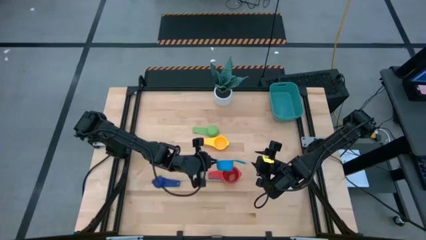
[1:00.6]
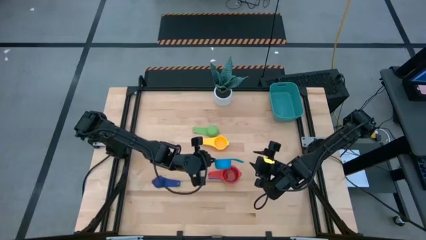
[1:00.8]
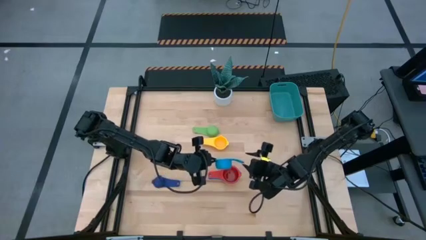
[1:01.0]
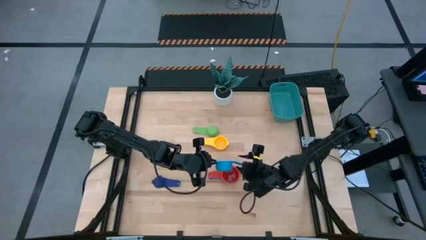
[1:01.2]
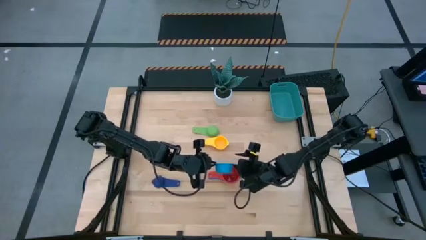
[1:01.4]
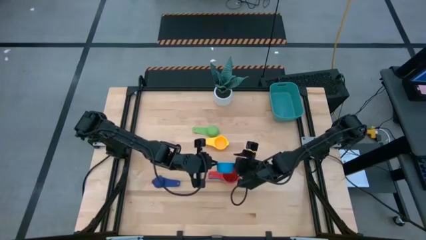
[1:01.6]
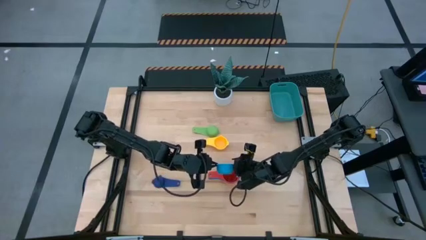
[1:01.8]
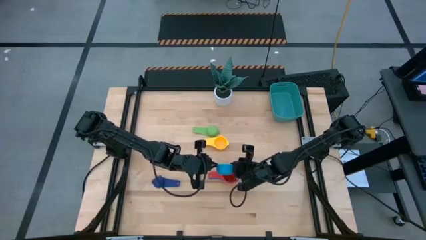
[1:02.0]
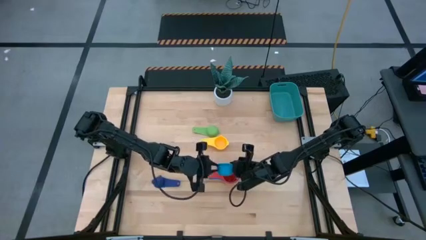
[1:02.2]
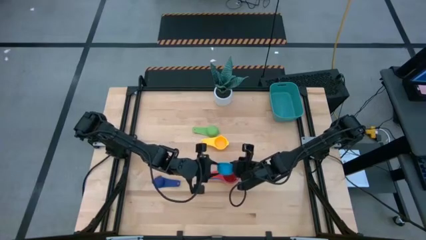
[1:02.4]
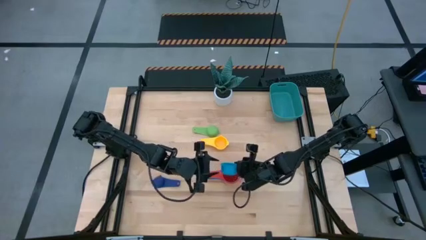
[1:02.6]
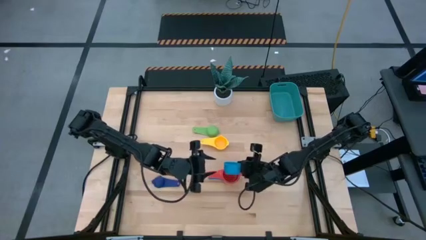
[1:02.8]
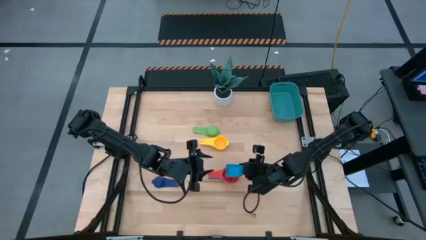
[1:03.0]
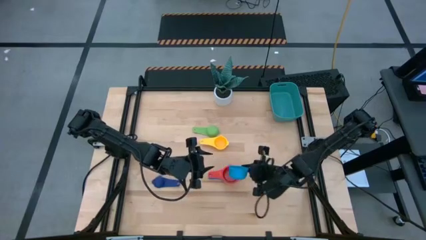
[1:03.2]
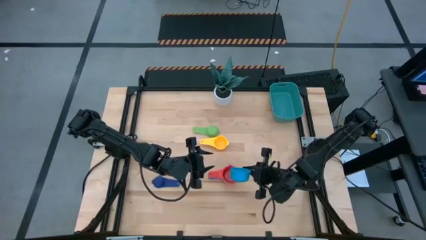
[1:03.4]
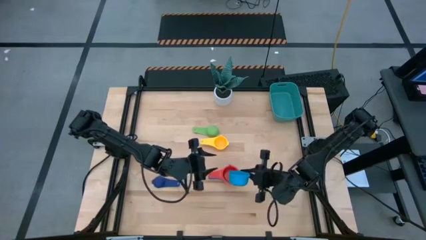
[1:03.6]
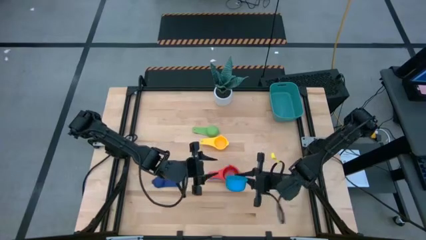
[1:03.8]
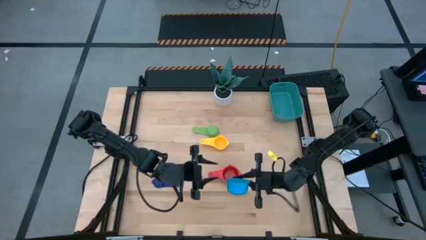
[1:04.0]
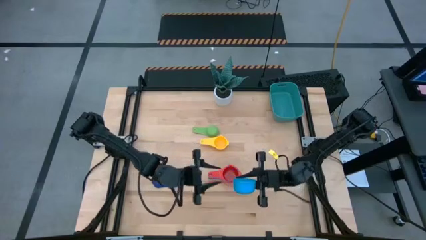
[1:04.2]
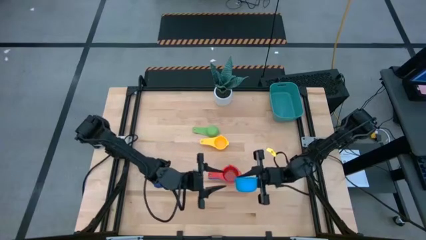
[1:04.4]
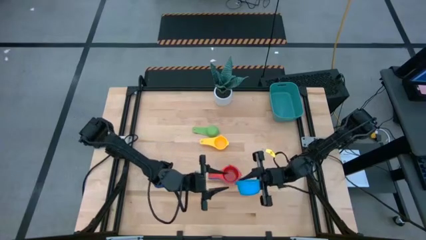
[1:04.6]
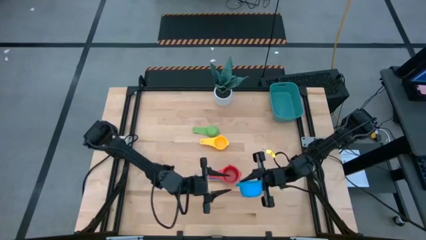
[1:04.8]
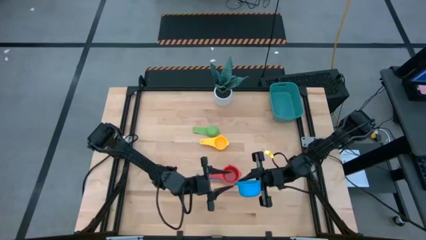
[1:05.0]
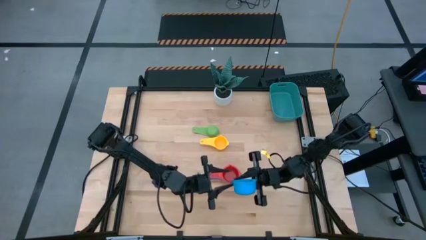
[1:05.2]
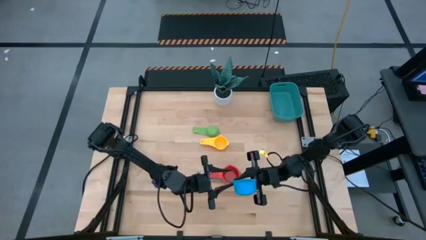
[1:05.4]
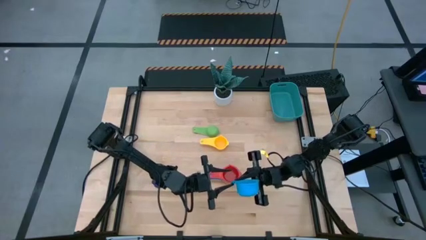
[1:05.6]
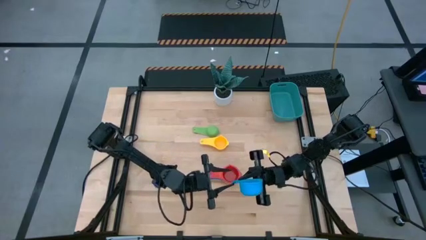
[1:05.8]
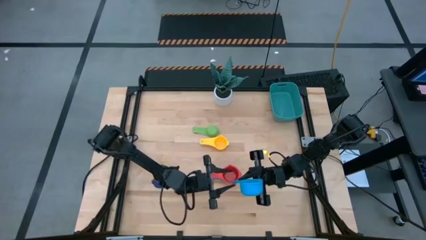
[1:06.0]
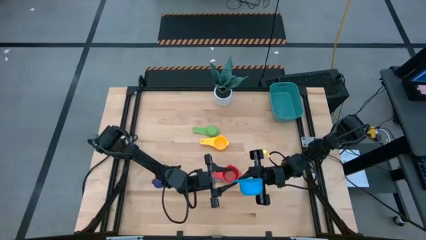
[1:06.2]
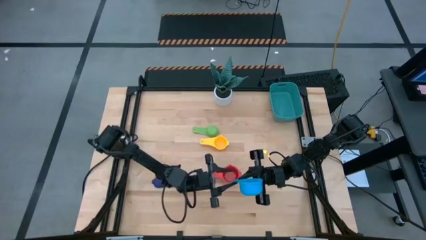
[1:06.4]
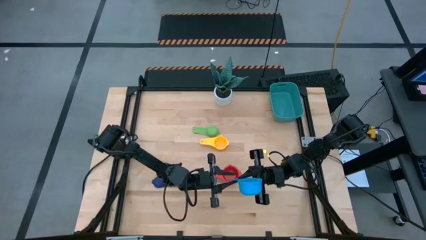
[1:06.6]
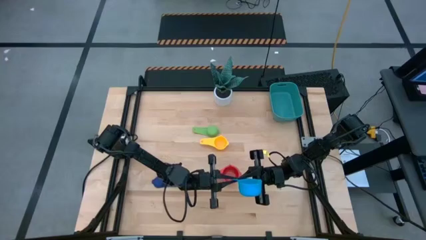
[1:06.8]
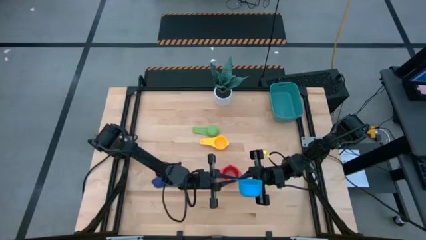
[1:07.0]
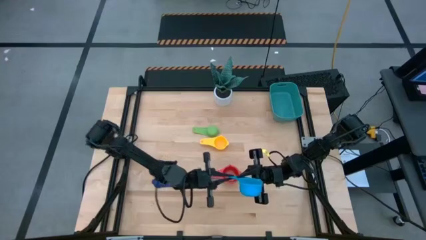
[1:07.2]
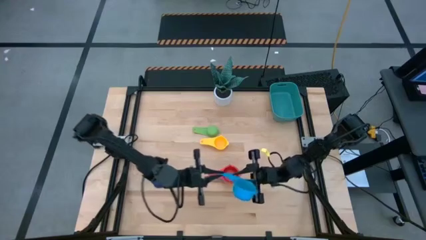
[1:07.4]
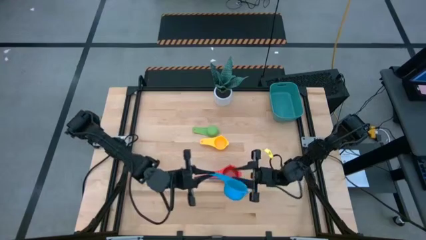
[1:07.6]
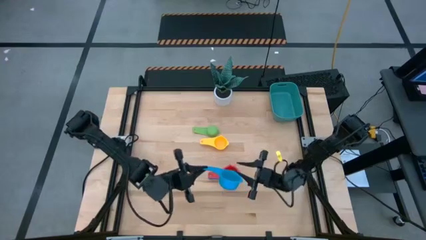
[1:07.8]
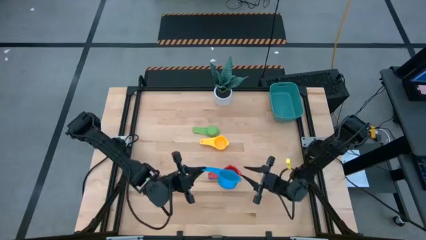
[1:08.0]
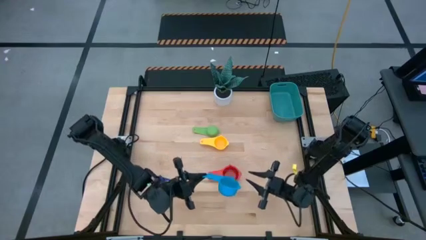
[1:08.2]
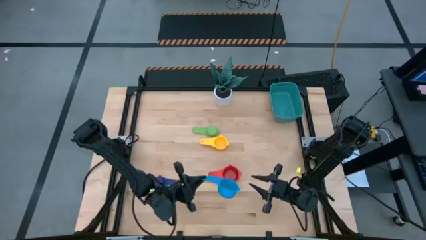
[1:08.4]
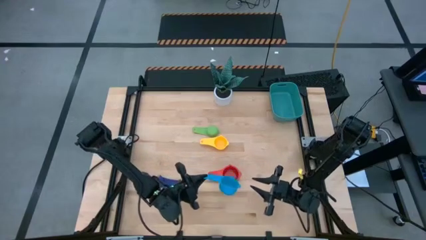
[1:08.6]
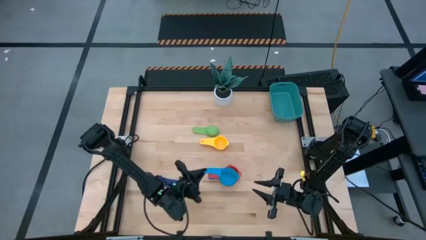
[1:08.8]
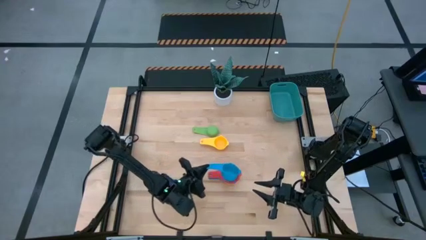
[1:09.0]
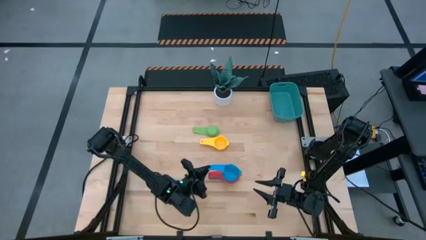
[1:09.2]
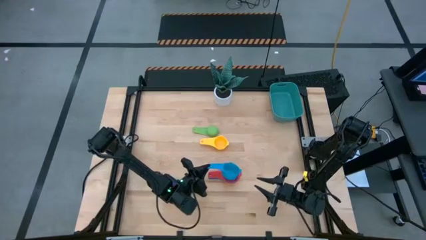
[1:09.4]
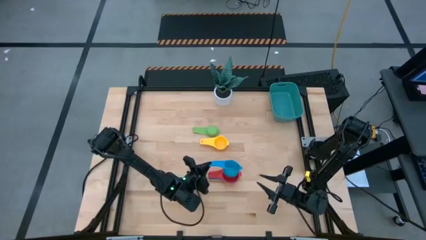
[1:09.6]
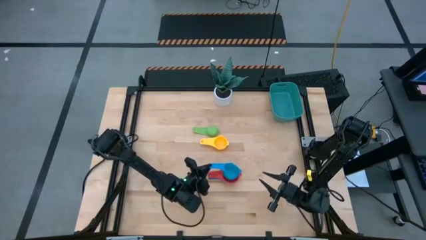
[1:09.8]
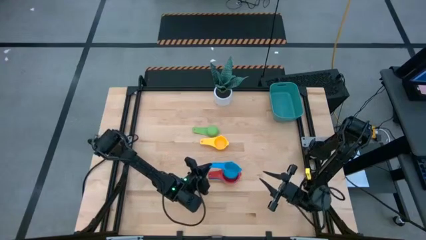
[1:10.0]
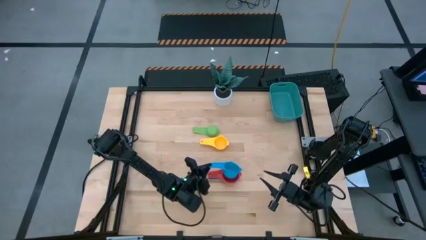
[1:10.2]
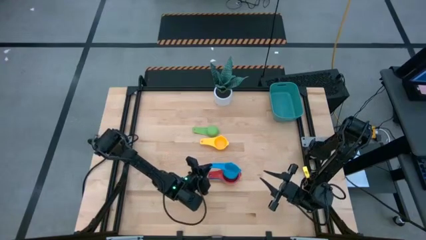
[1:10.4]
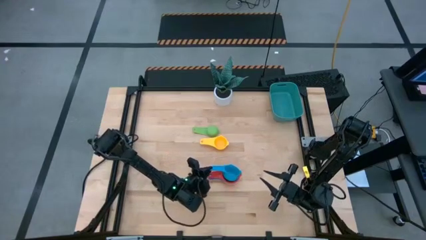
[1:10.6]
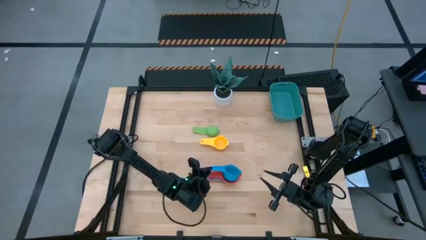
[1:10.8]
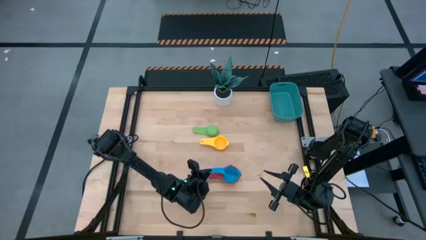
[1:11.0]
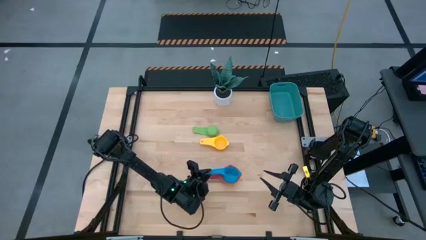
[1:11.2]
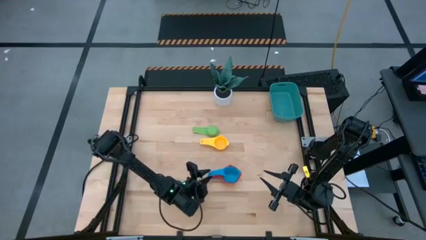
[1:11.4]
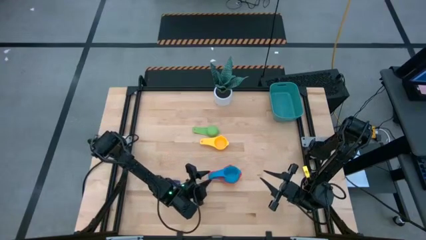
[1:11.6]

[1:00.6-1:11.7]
Task: Nest measuring cups in basket
Stack the light blue measuring cup on top of the red measuring cup

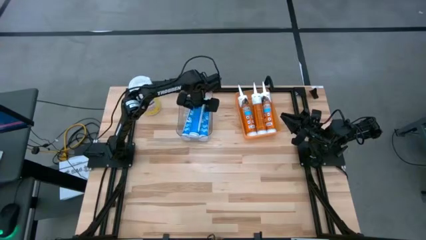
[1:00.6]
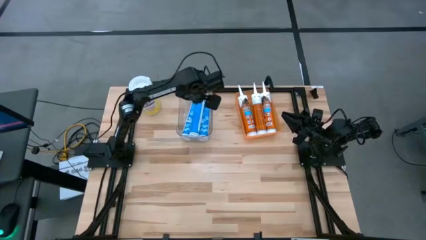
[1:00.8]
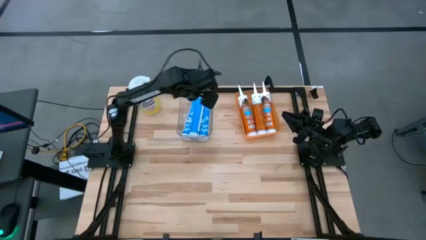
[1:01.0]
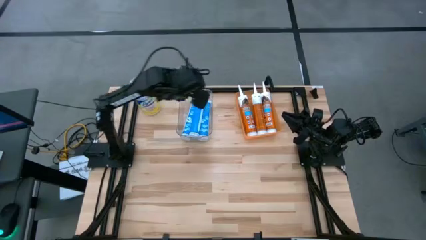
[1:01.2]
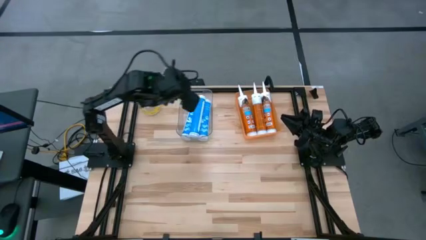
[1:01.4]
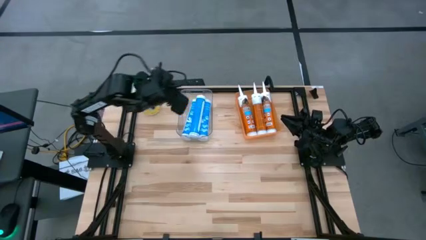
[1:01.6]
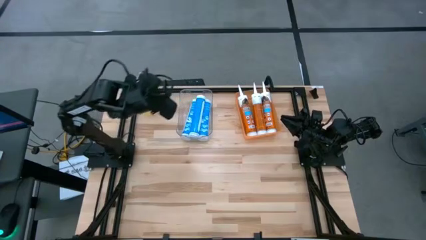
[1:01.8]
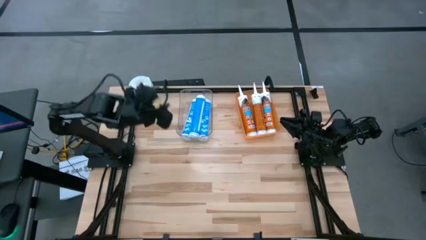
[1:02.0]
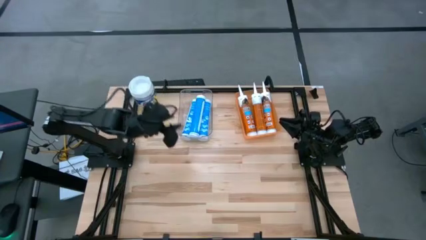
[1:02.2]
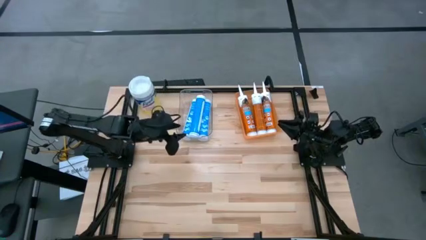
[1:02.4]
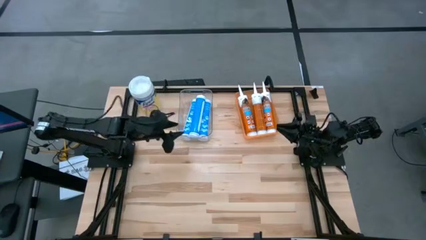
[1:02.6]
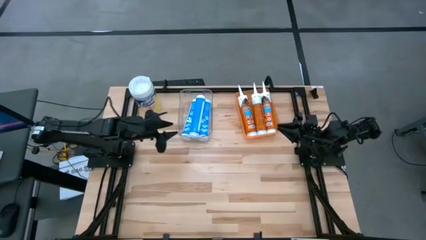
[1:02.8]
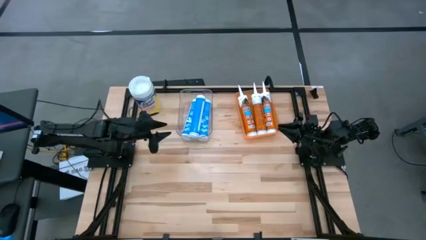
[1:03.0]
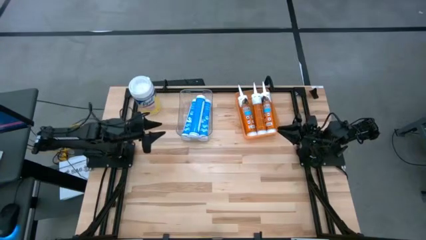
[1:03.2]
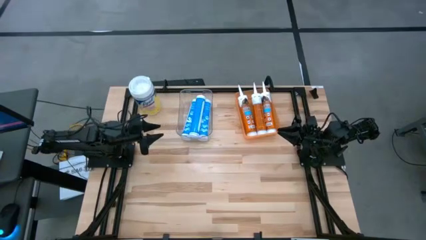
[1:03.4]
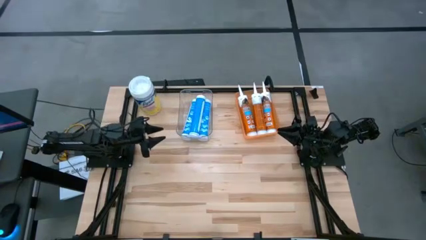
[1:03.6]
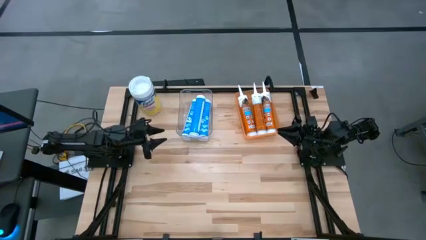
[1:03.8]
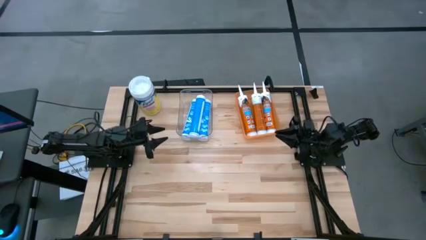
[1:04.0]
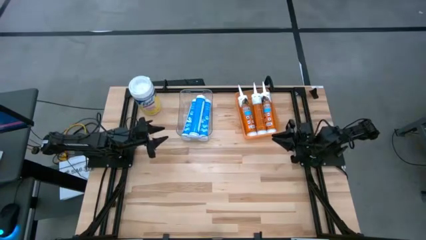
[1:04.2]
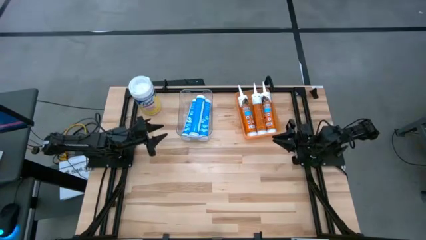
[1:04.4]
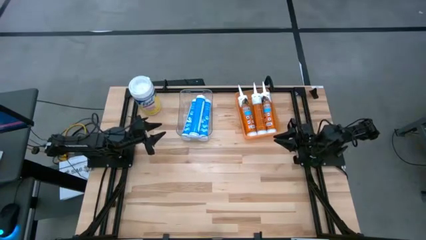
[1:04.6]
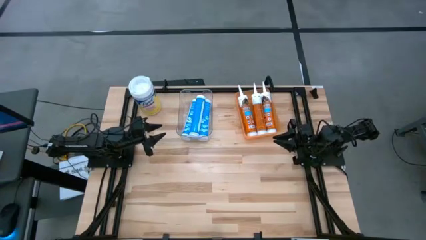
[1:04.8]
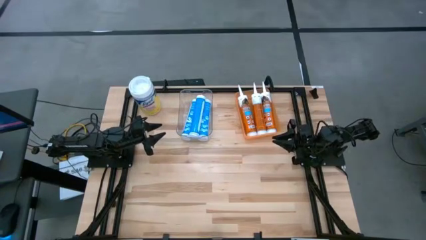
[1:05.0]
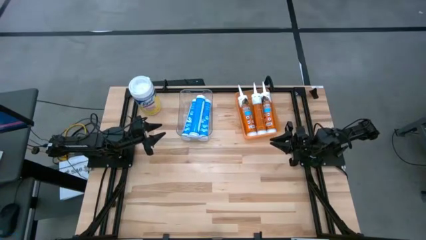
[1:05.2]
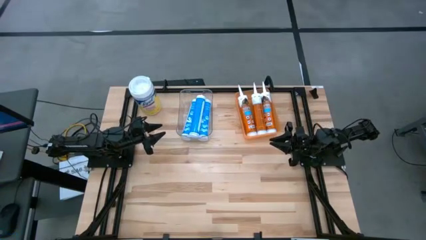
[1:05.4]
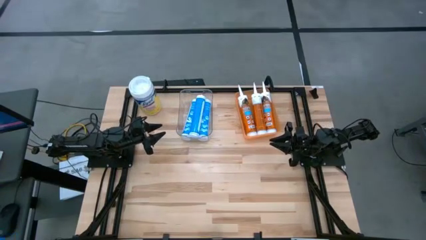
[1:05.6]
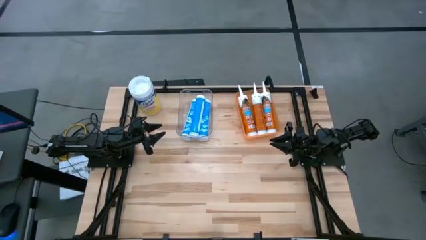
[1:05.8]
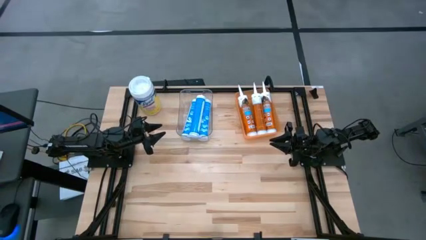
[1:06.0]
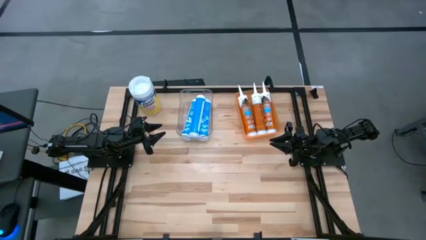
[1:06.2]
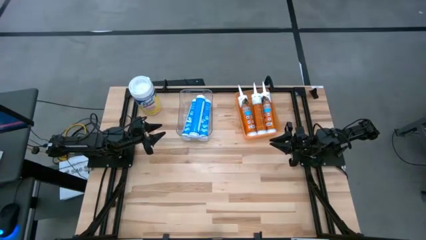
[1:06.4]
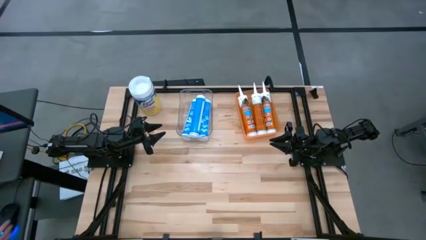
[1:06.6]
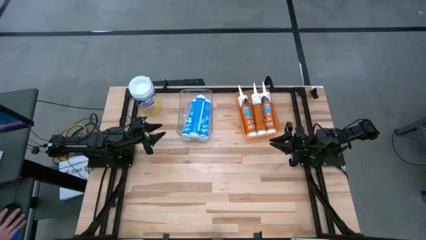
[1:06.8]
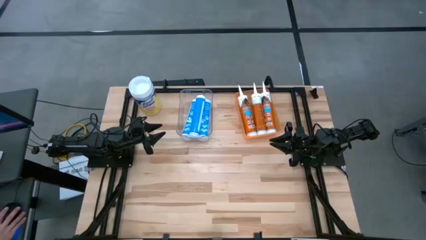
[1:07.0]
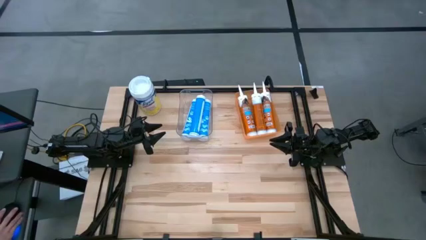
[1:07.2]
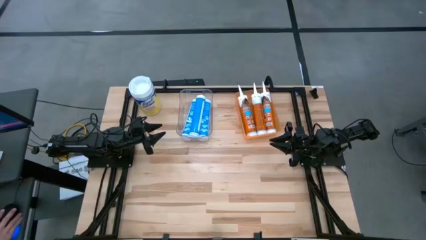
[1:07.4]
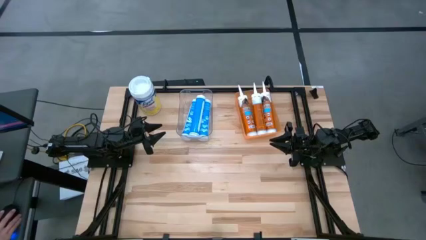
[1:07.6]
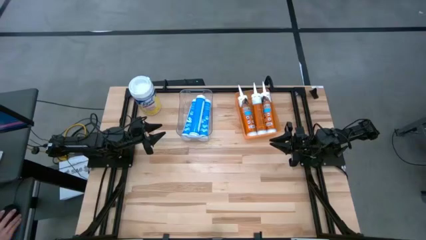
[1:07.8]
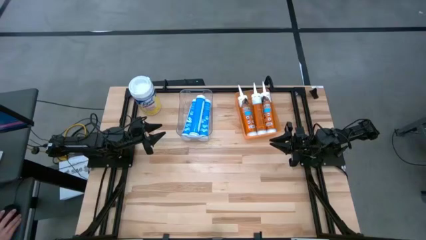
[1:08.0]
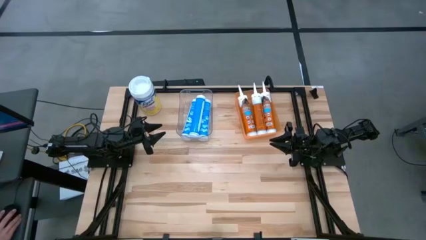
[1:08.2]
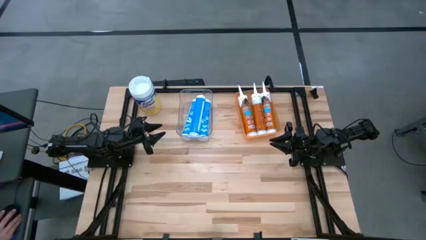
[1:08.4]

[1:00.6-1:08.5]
Task: Pick & place silicon tubes, Sealant and Lysol wipes
Return to Home Position
